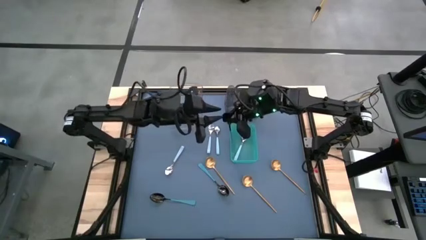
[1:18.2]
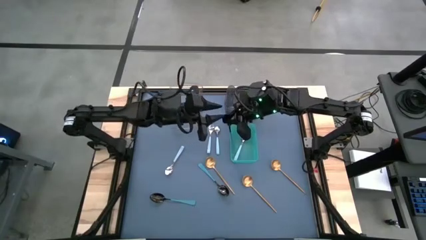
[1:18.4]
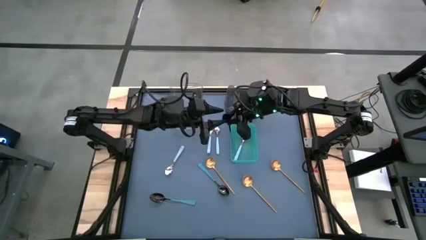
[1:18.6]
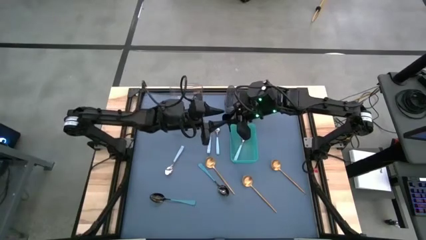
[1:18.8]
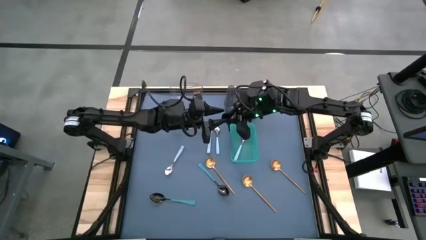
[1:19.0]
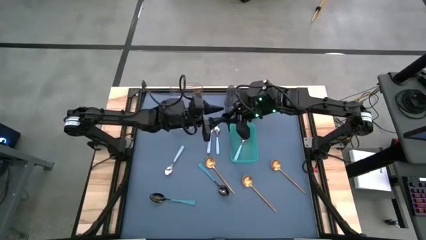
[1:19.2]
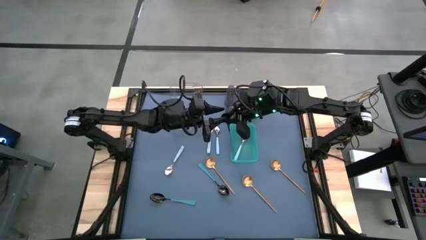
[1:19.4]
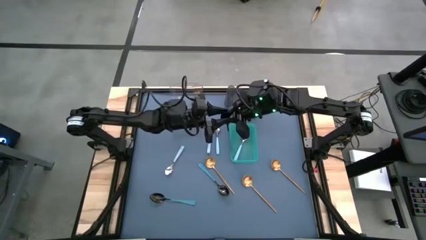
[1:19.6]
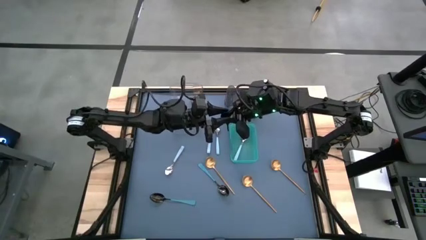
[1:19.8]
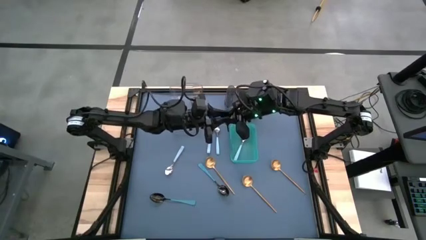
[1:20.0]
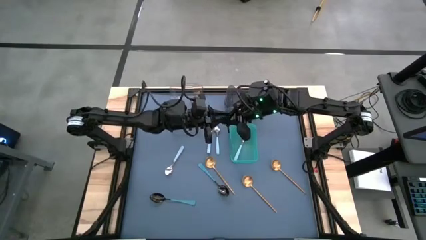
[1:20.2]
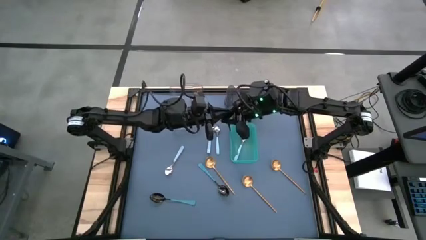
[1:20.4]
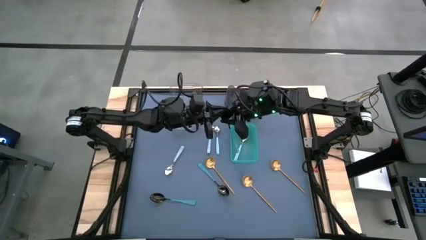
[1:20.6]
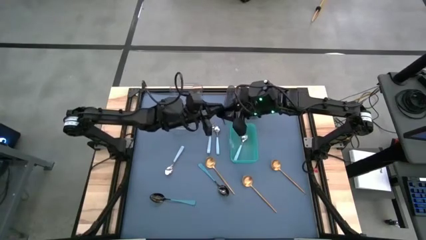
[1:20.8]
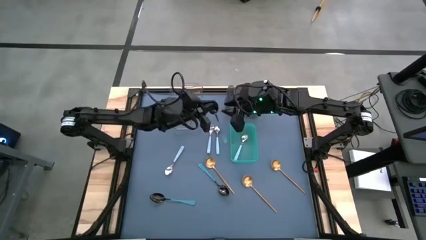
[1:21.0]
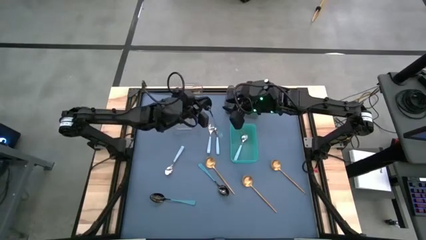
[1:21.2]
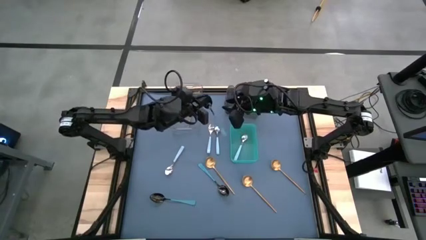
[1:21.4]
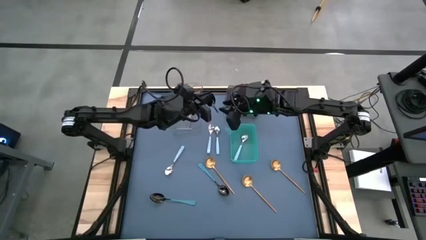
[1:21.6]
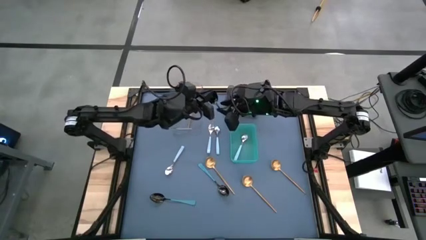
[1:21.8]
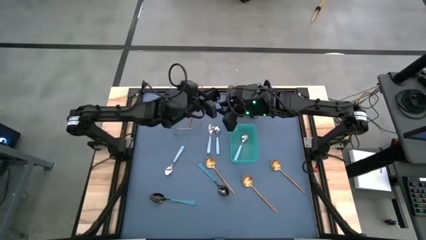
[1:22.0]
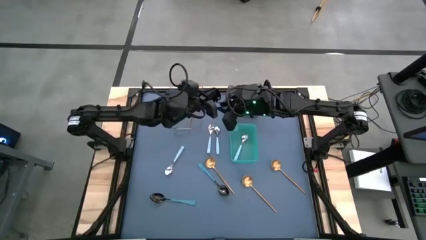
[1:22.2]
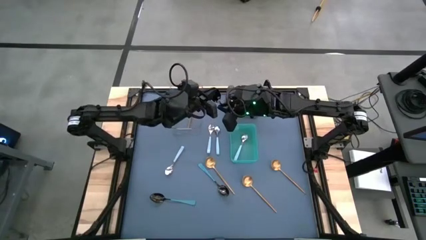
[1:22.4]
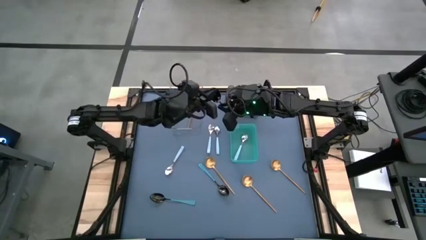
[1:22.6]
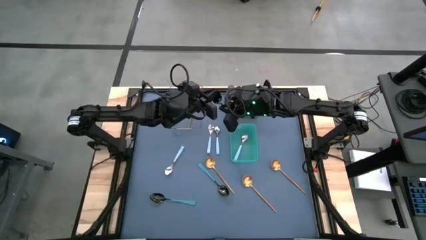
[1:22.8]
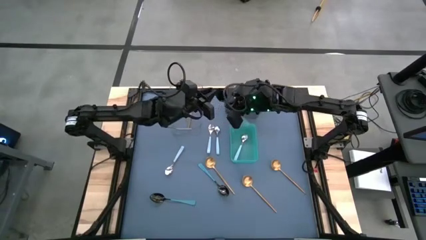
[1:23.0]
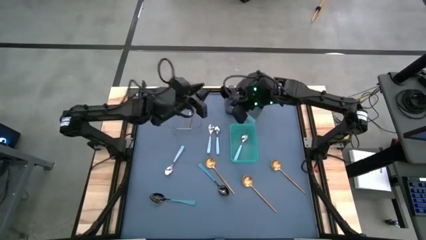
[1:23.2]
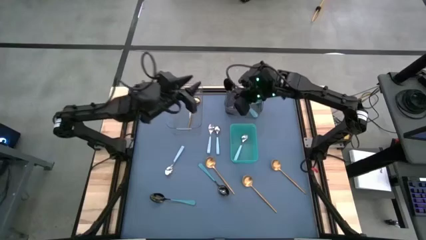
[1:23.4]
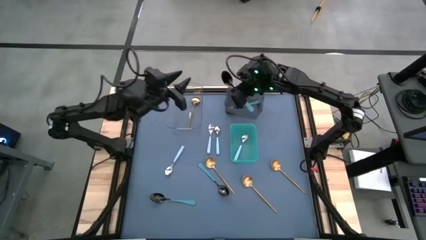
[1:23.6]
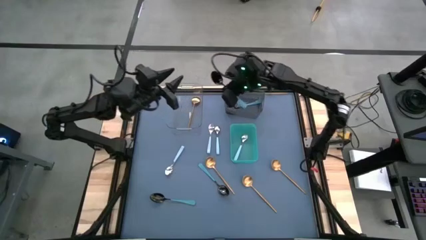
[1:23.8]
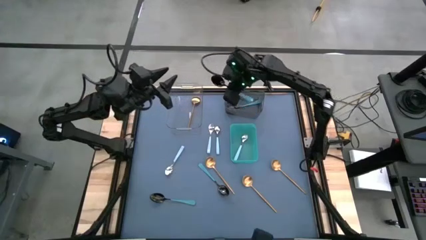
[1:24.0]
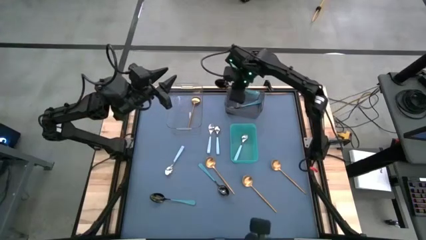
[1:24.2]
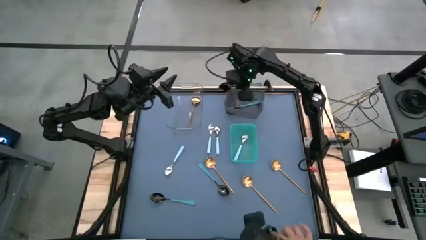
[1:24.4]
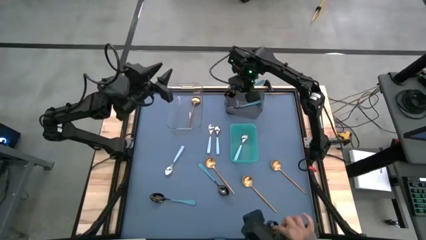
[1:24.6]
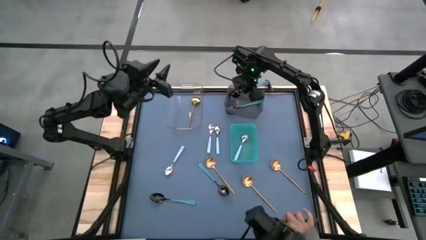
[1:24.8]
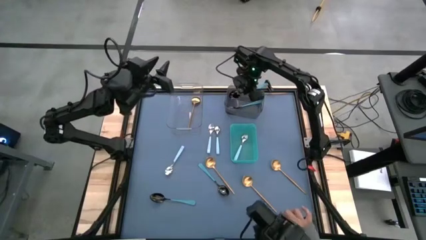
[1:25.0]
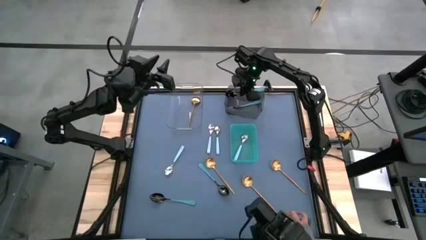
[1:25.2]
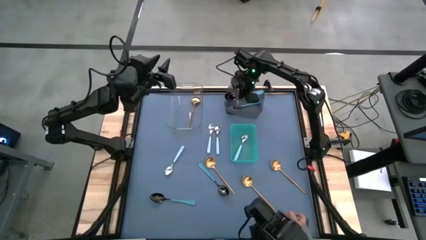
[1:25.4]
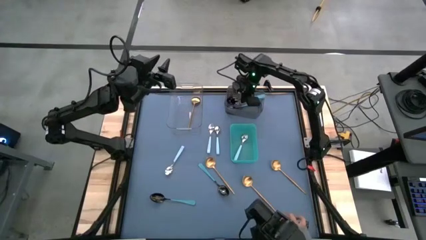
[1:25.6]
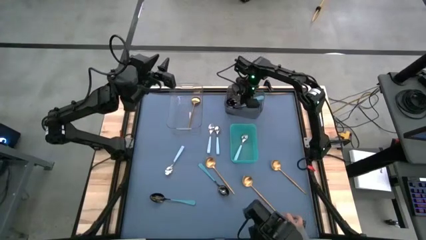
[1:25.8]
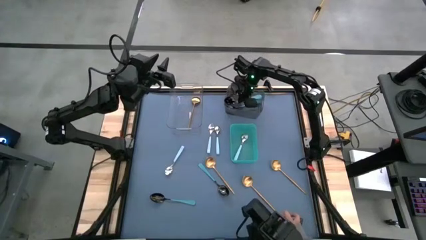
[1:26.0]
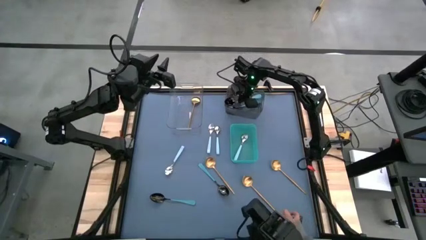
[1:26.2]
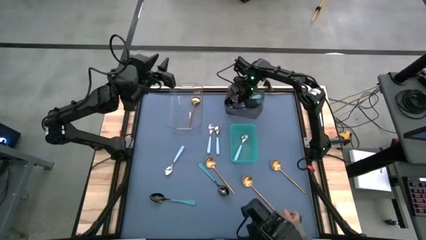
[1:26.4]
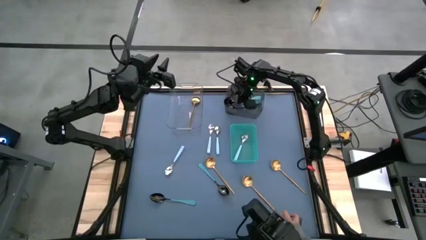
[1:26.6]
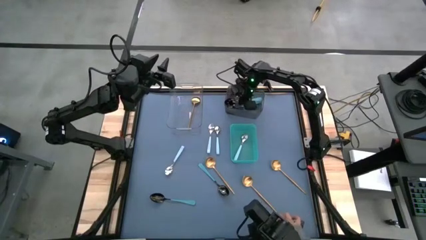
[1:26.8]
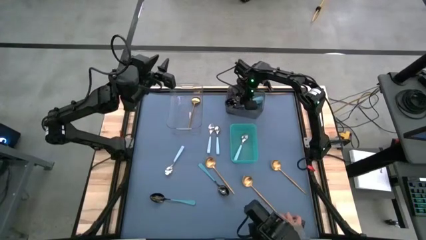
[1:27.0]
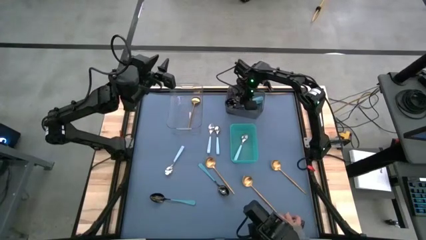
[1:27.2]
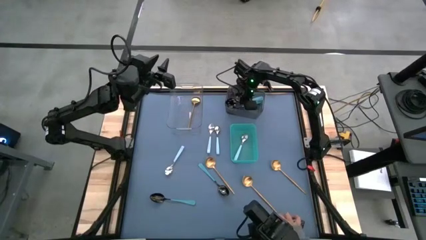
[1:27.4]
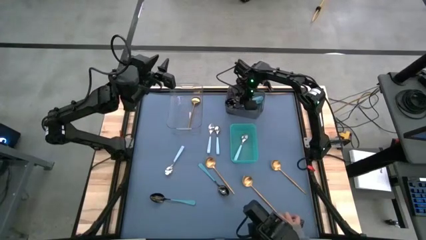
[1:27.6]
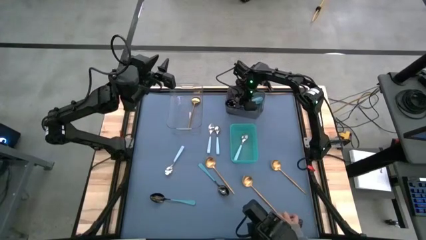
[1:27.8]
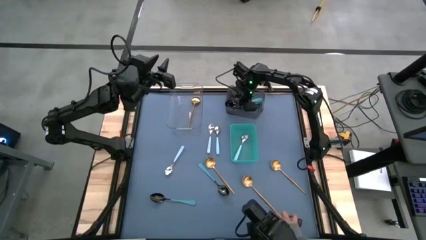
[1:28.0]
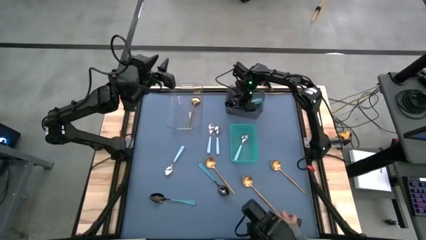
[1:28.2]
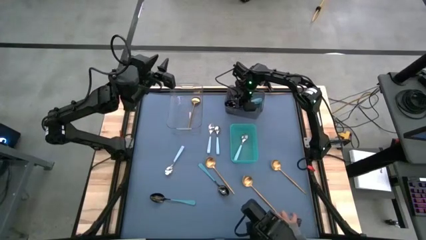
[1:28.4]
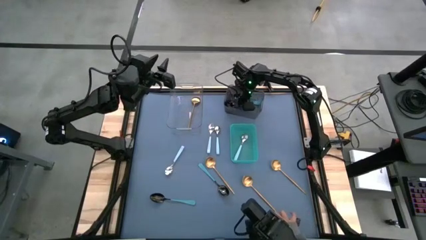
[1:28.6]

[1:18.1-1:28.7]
Task: Sort silverware by color (type)
Put the blue spoon into the black bin
